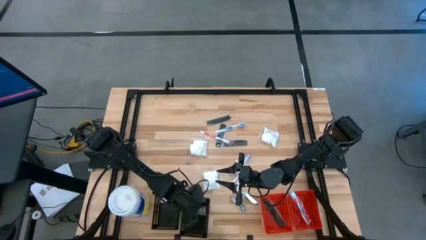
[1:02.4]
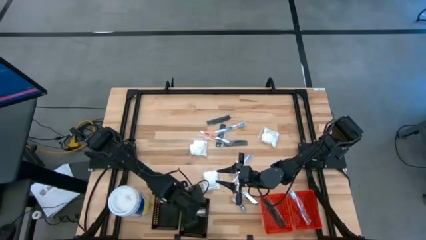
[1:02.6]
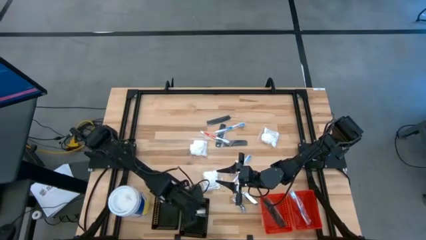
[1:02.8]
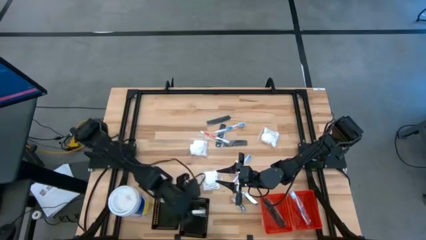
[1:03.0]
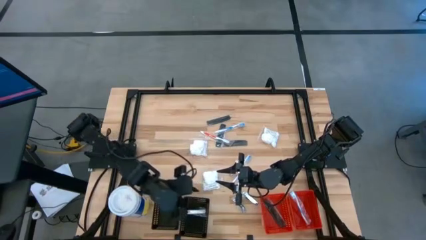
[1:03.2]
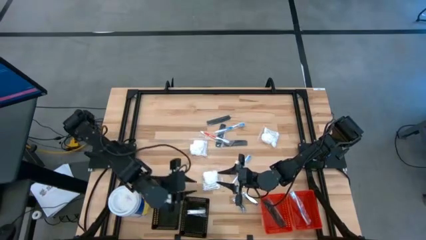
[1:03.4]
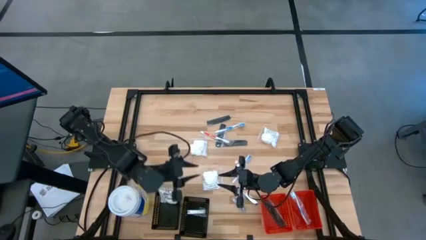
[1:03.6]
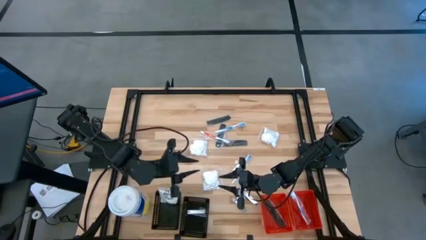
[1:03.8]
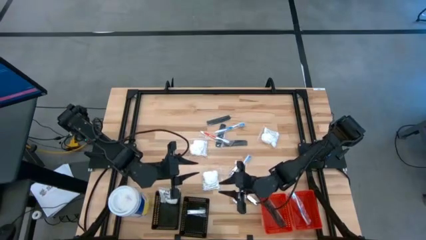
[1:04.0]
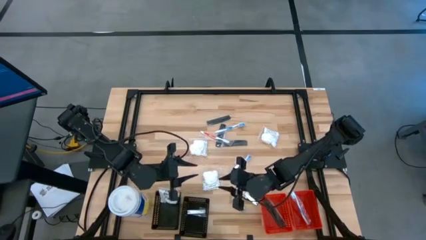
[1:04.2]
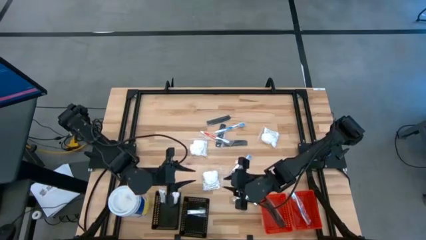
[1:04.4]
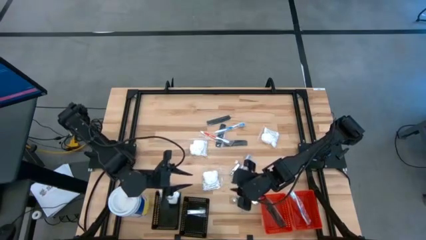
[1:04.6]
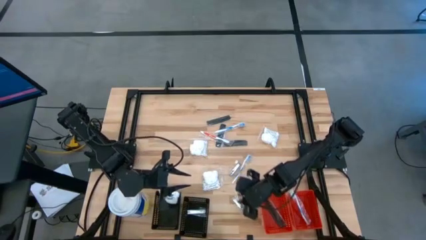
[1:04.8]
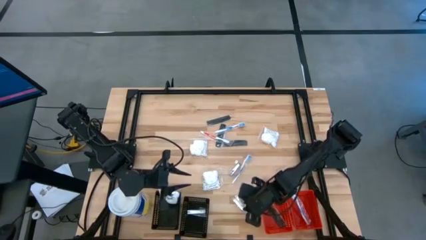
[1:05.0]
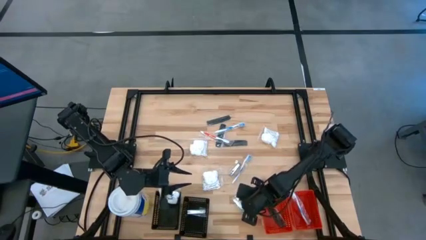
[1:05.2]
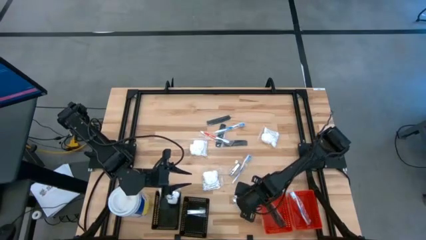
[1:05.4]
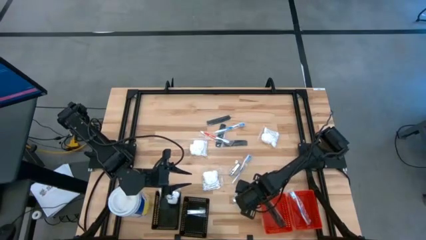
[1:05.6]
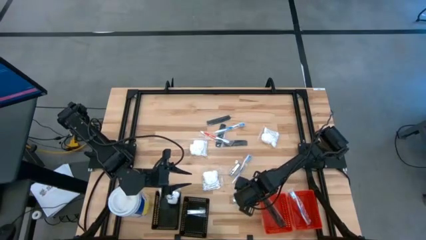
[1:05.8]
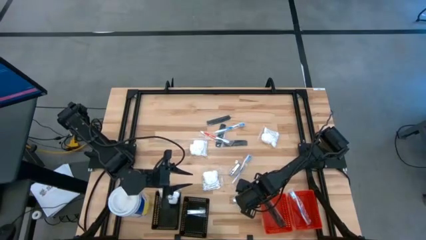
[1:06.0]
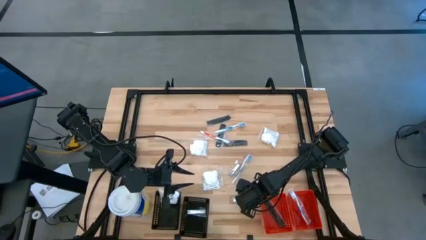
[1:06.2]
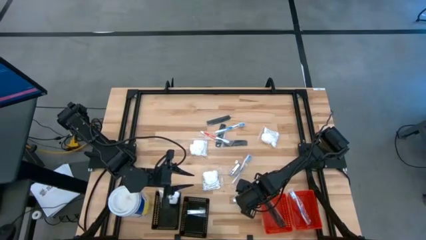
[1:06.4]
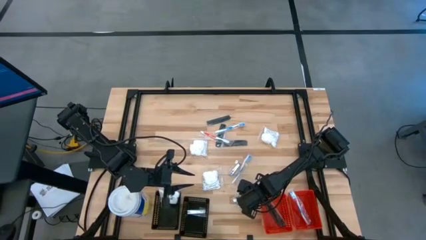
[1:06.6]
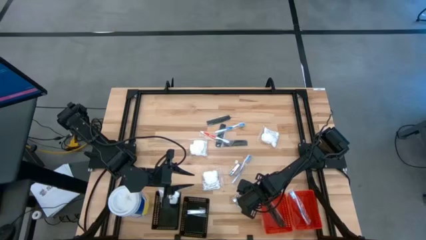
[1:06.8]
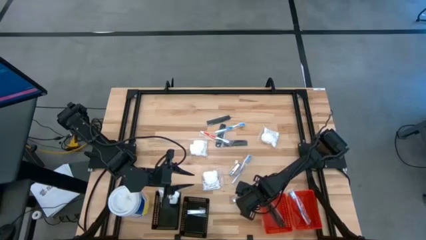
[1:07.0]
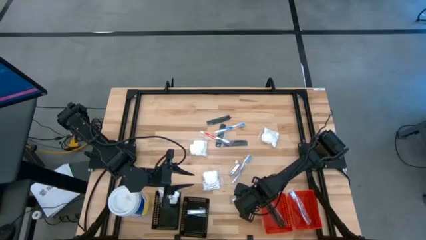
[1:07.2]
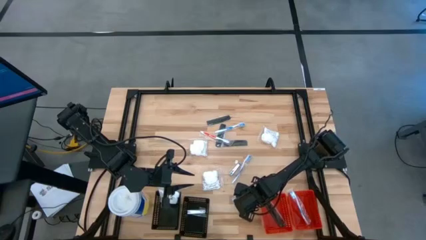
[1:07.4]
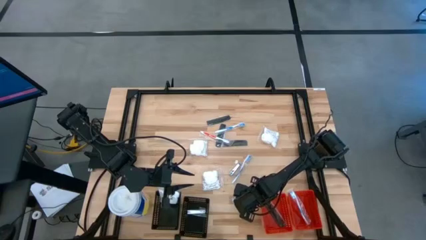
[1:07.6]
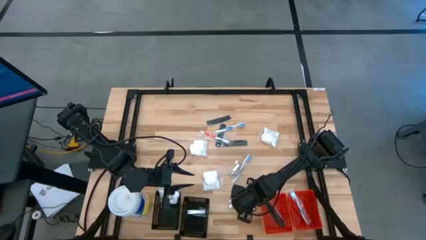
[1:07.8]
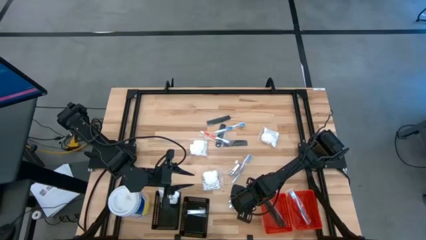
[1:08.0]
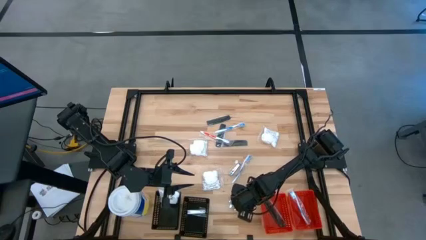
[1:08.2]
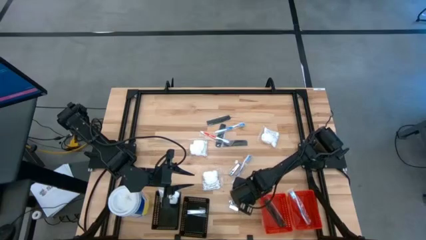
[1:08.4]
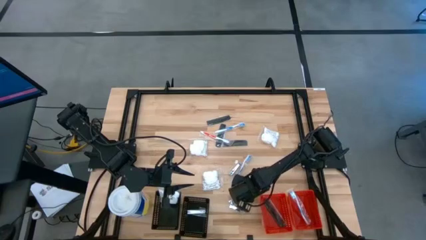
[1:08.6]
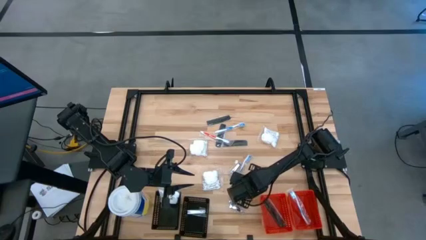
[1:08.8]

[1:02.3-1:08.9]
Task: Pick & Place Travel size toiletries
Put the nail cutter into the right black bin

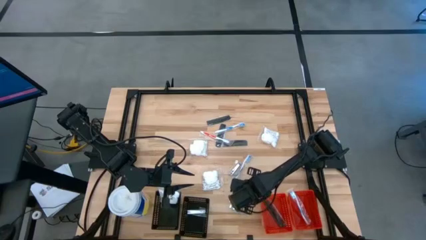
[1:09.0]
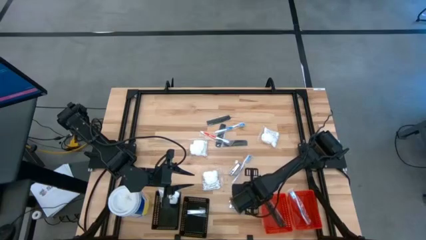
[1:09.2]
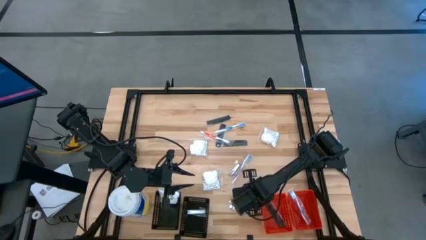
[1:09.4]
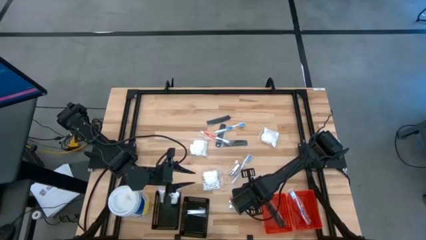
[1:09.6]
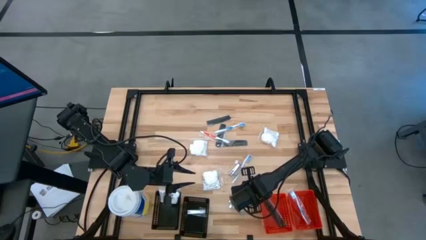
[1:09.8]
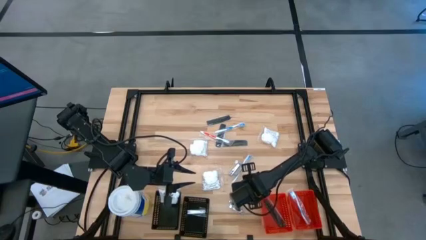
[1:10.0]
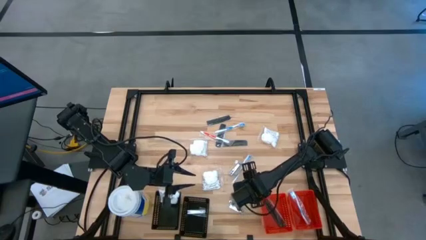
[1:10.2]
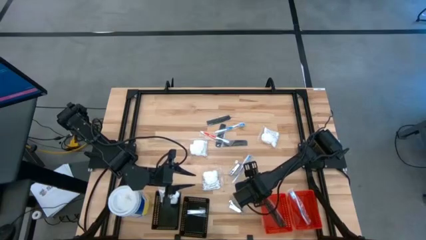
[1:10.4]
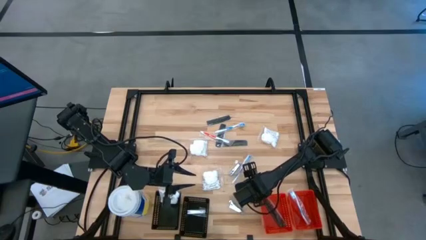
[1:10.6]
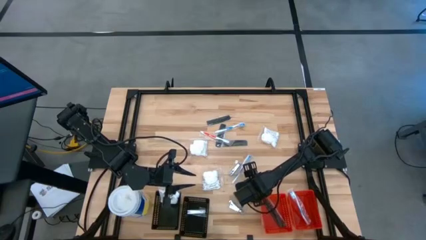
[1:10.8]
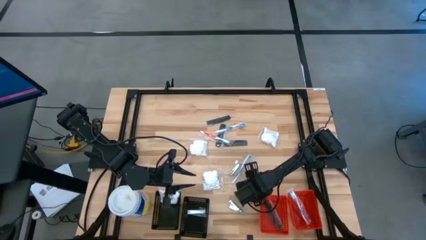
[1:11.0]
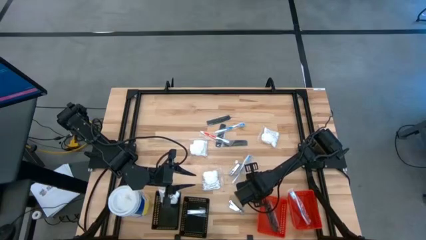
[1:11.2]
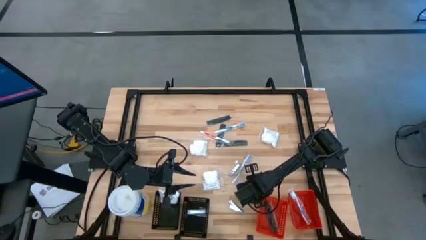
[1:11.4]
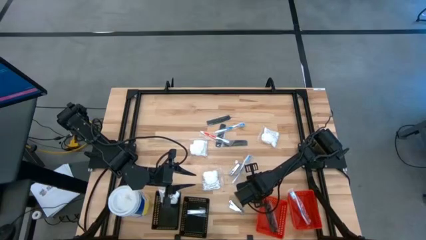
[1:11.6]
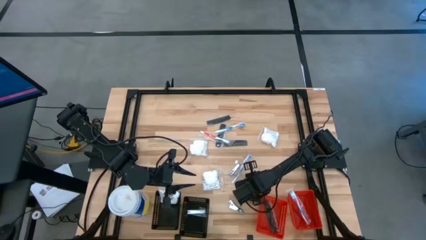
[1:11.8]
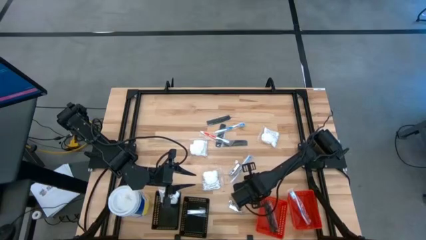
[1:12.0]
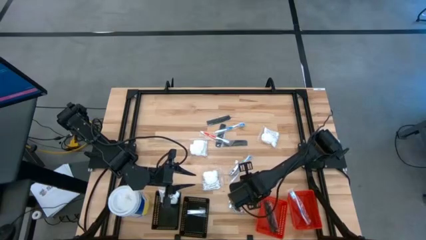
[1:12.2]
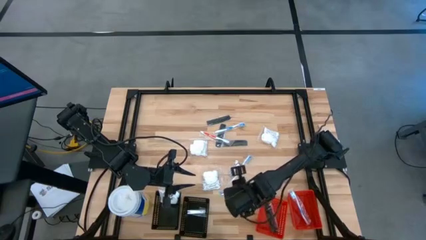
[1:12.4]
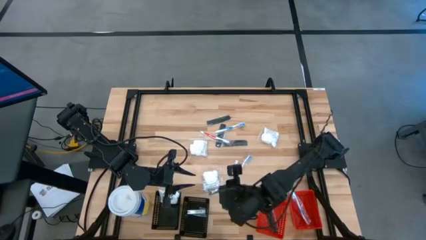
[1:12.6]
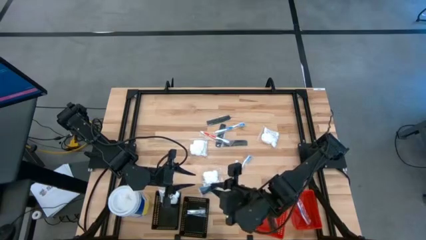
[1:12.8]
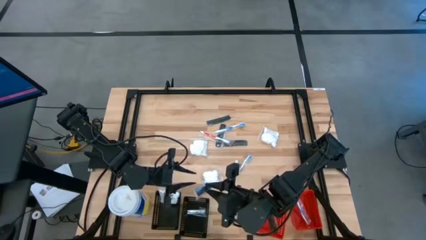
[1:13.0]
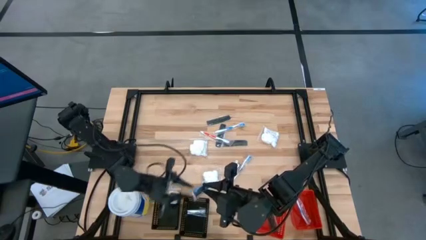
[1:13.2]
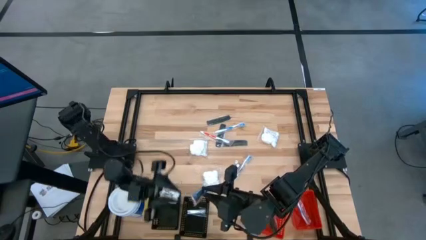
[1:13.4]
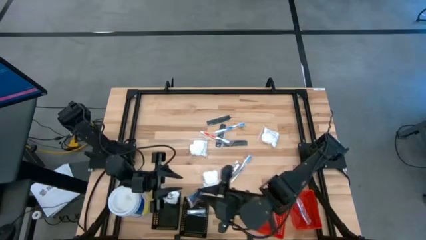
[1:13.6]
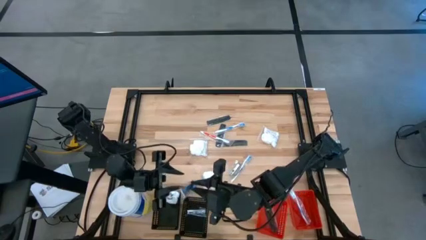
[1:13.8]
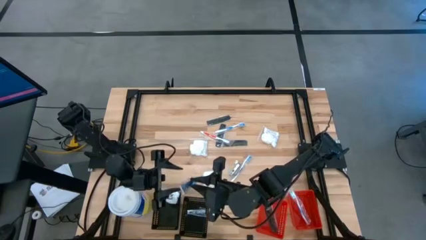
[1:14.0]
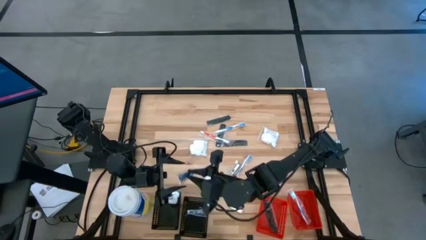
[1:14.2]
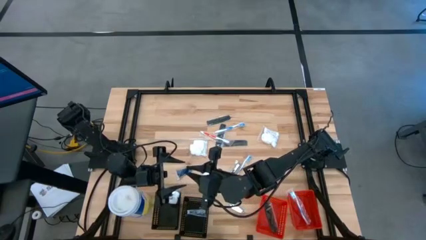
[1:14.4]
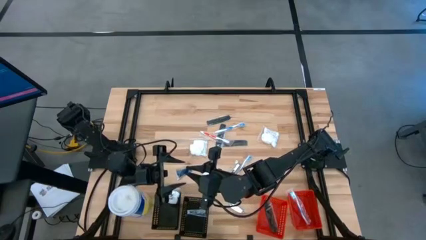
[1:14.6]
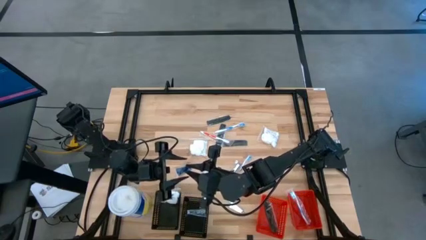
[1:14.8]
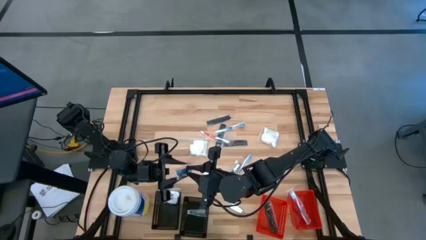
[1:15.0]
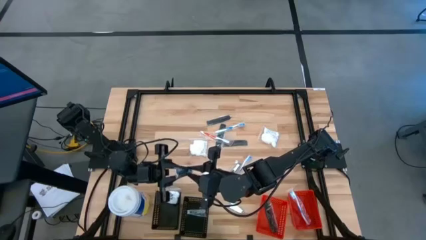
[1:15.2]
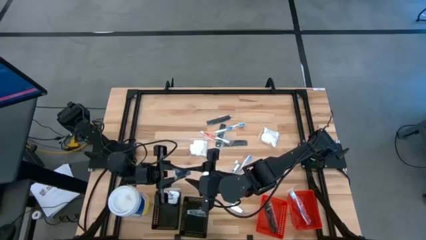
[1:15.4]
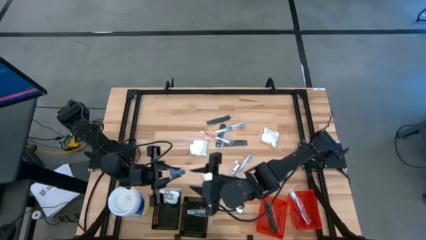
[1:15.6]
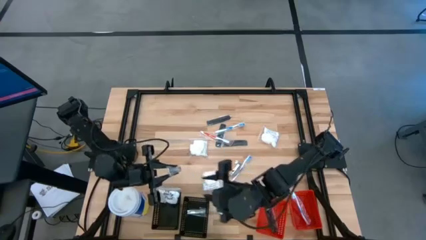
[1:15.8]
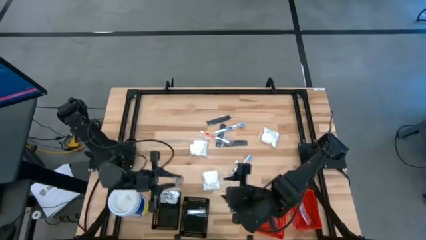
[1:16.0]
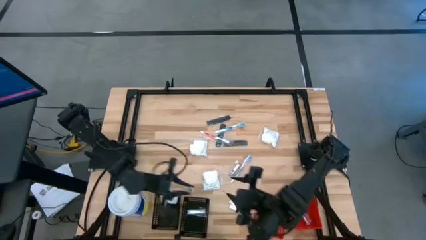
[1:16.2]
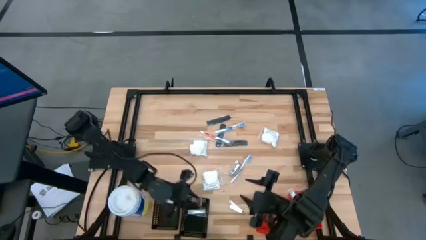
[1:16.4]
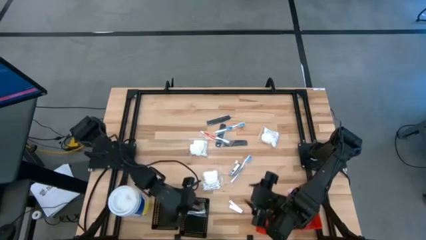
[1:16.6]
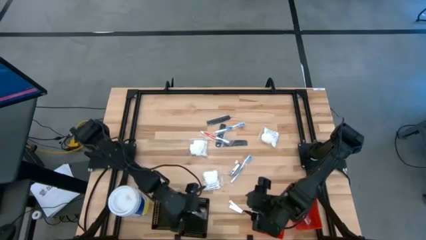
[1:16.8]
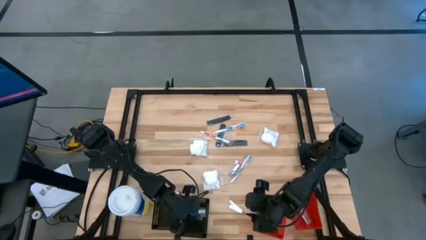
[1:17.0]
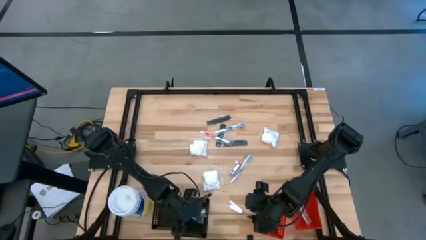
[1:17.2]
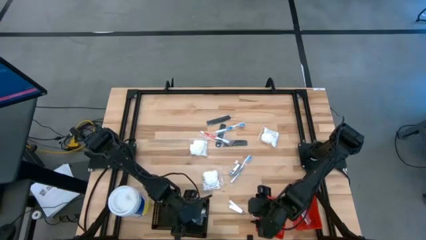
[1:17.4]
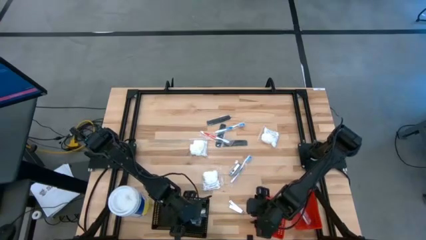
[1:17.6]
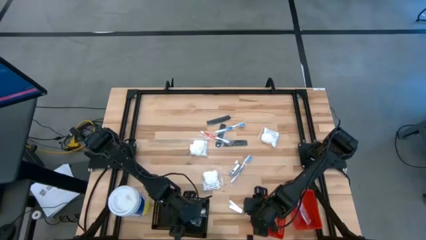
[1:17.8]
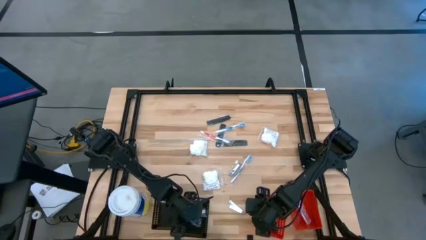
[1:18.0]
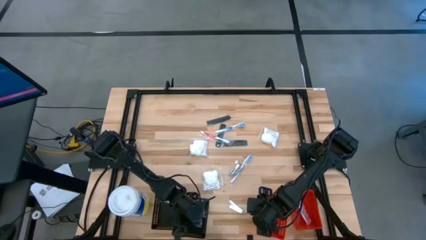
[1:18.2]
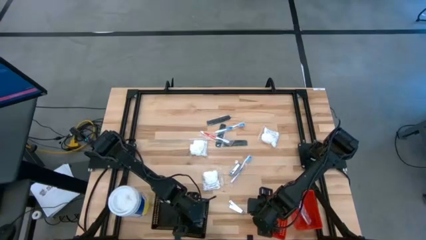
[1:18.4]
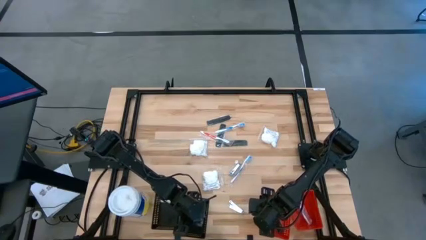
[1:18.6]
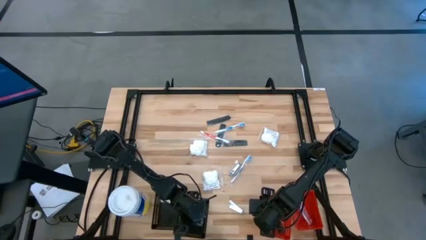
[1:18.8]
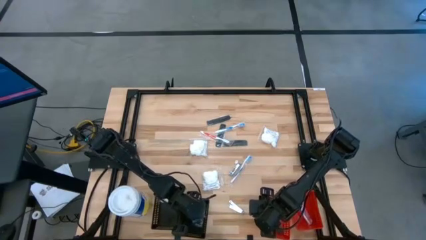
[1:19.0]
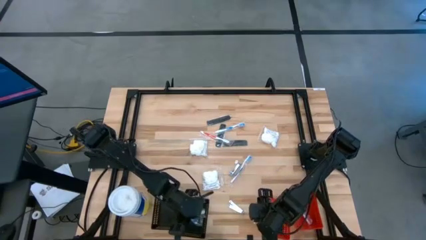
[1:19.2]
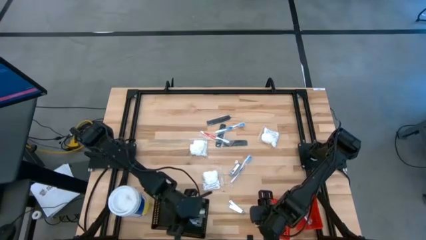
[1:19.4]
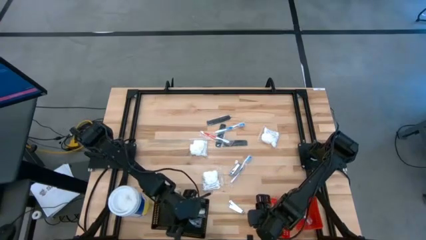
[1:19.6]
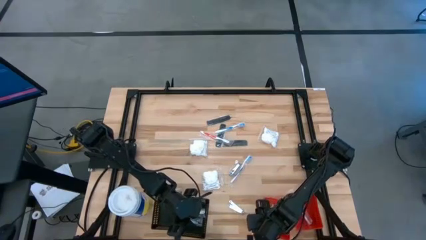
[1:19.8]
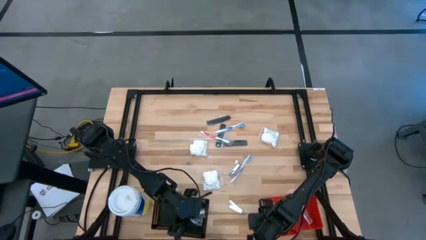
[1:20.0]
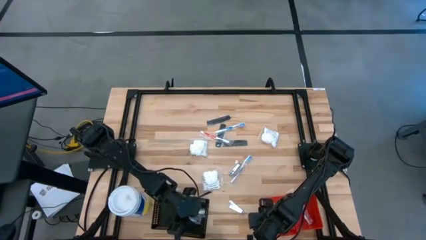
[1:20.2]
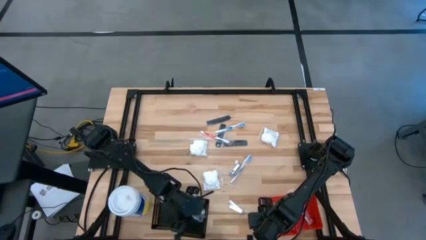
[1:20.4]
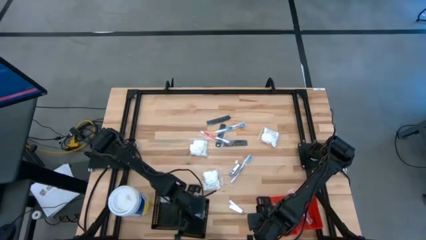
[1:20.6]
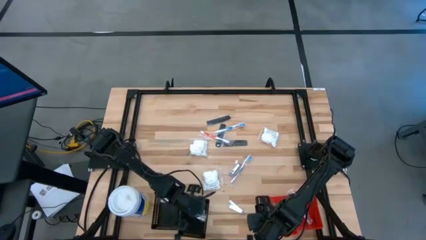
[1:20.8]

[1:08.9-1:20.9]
Put the nail cutter into the right black bin
